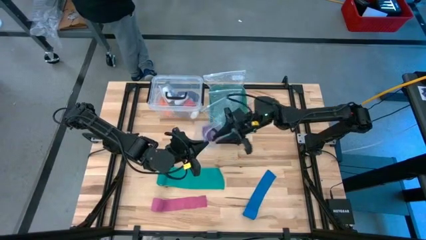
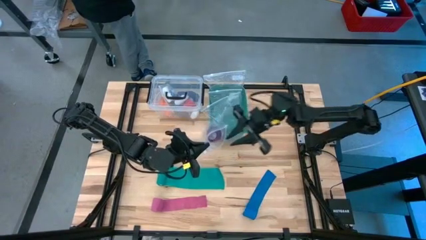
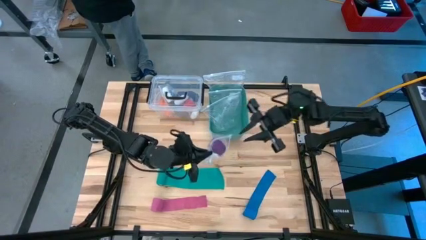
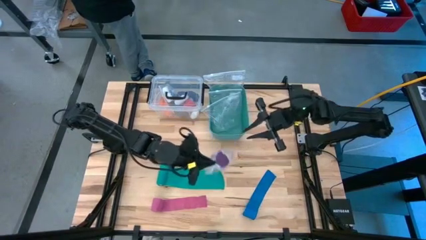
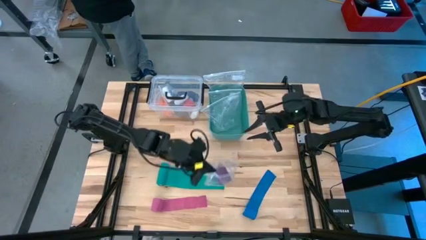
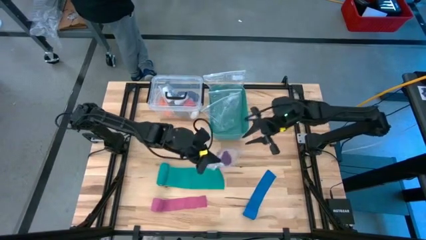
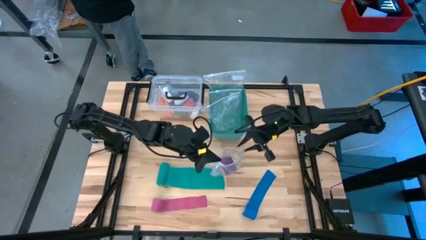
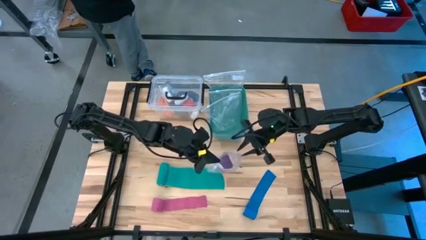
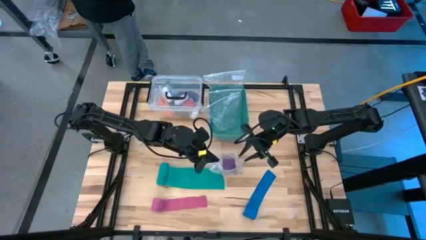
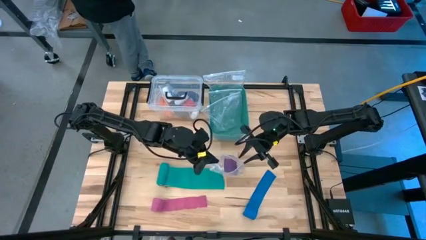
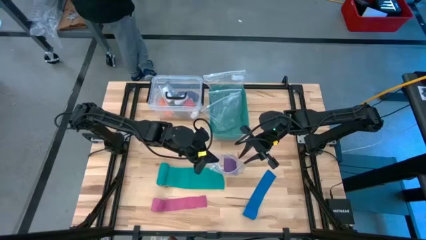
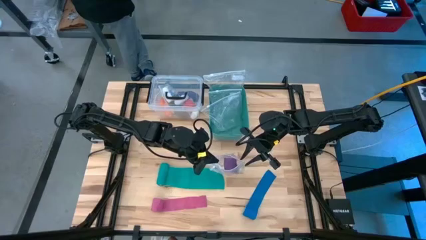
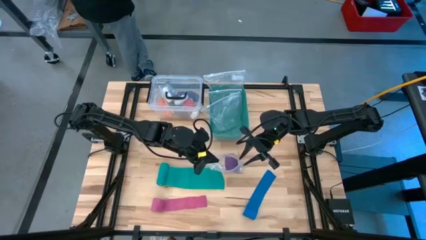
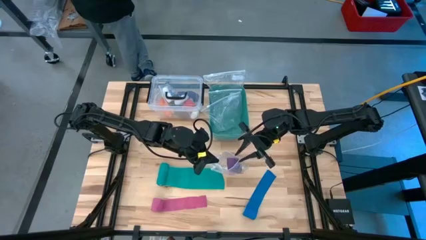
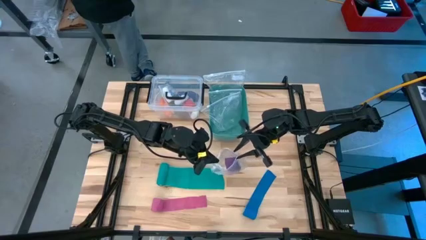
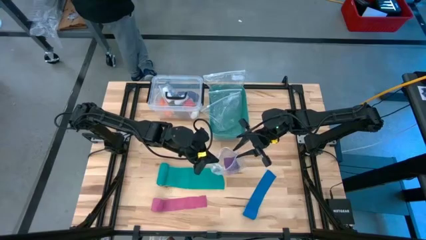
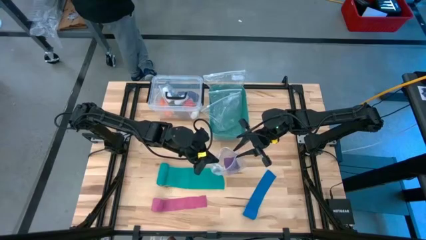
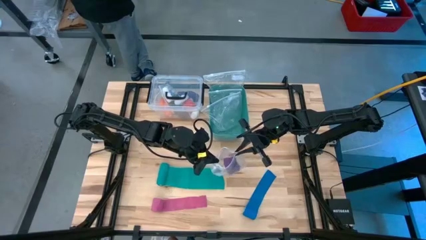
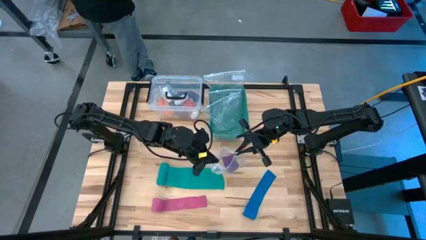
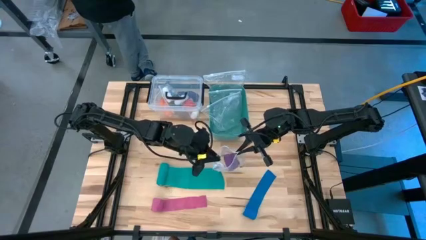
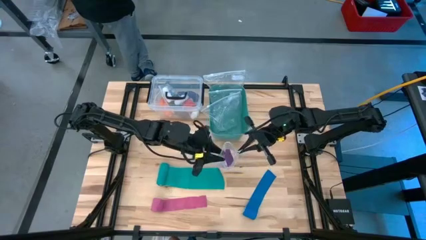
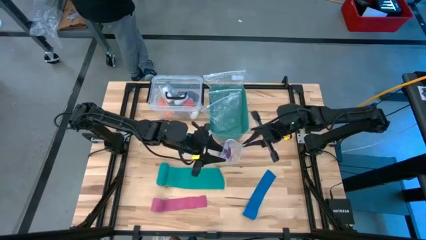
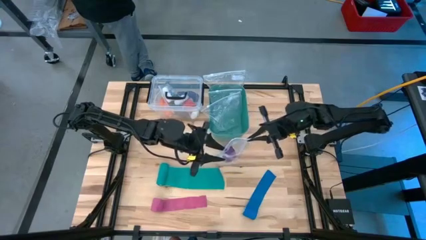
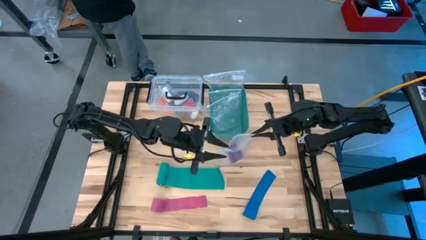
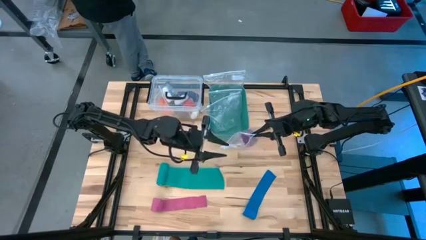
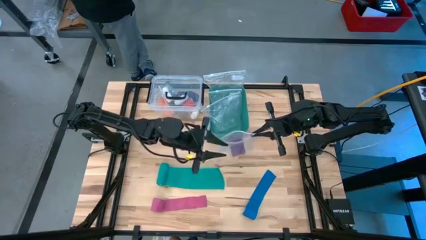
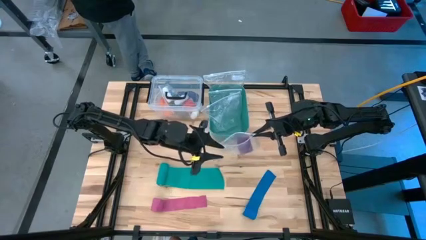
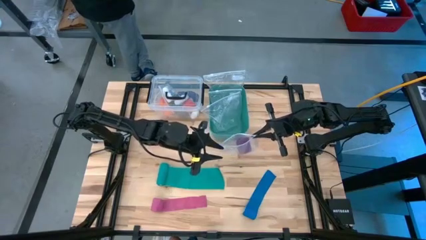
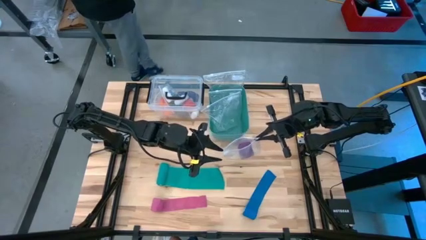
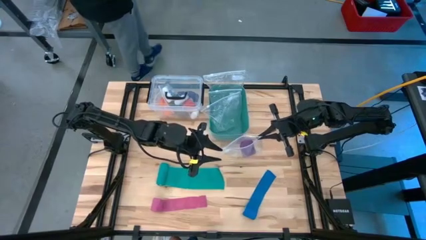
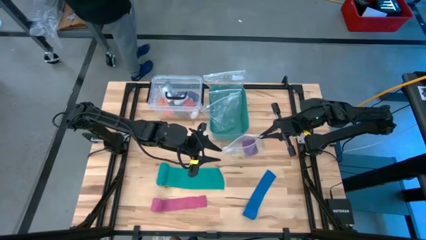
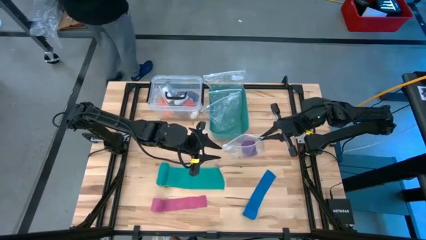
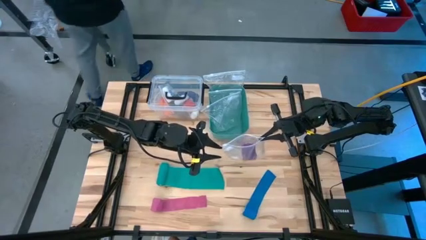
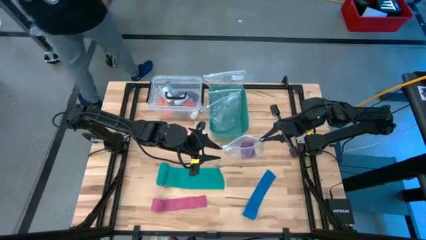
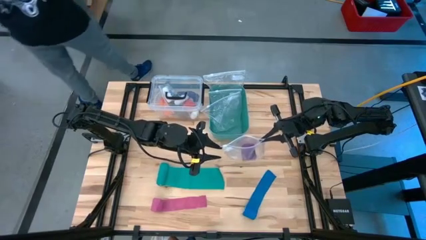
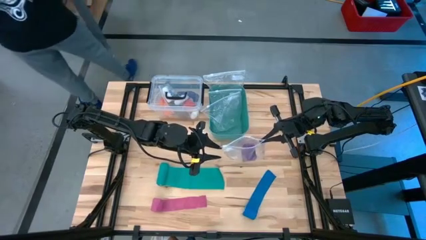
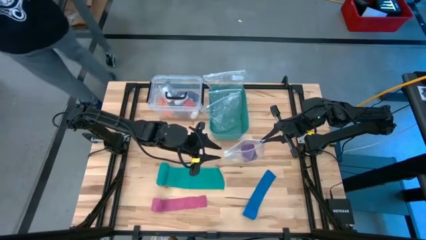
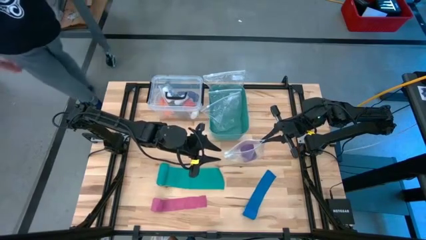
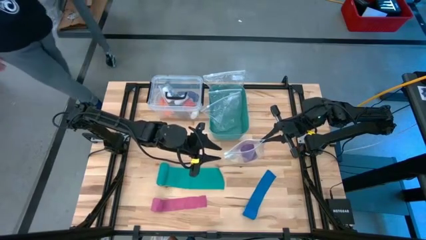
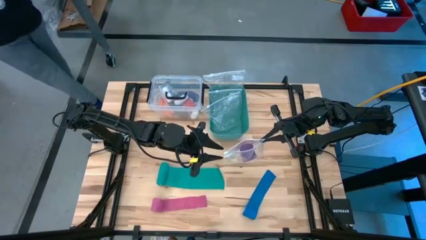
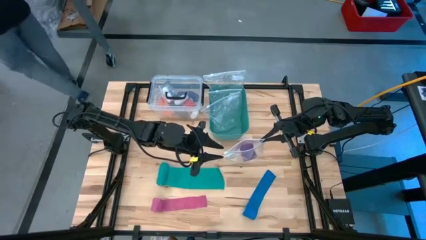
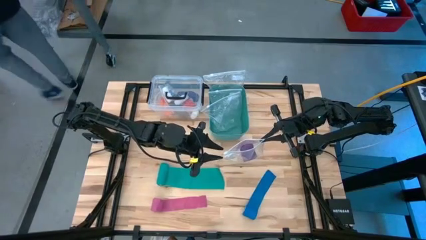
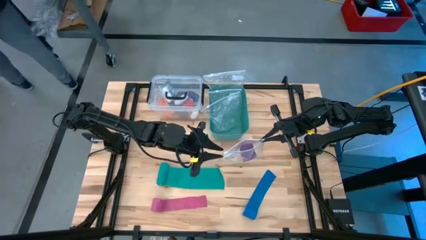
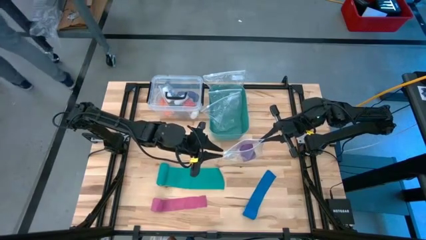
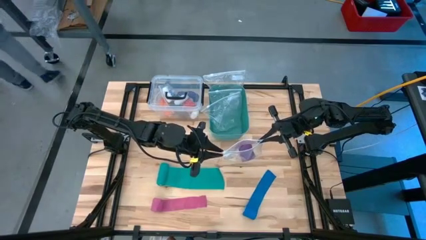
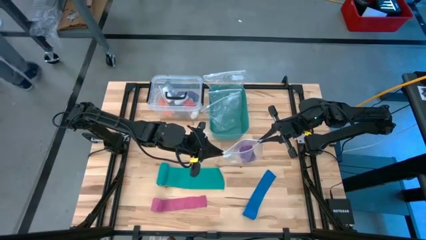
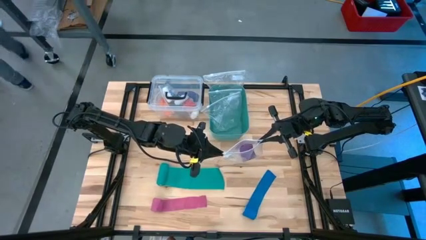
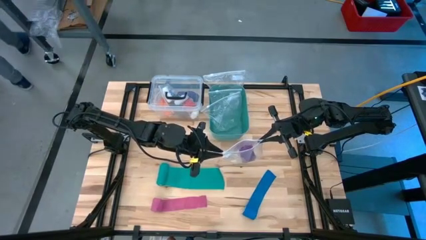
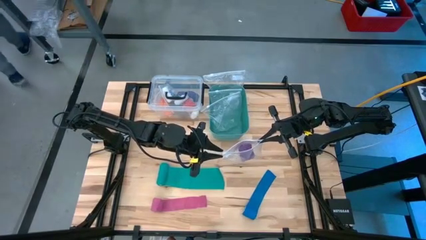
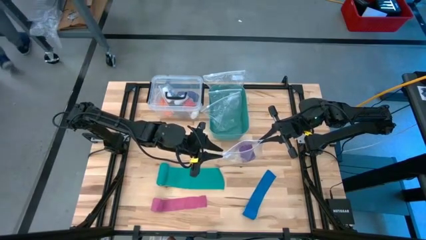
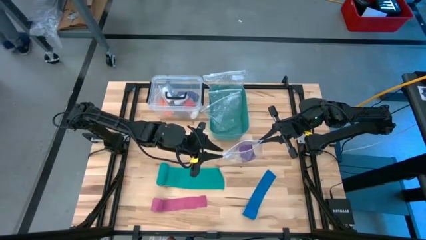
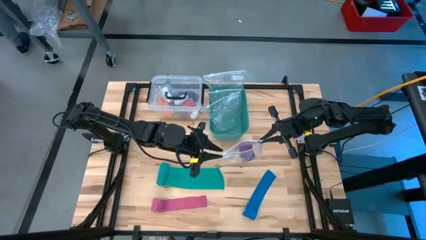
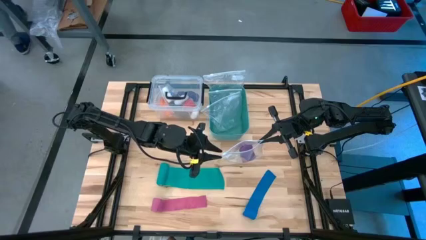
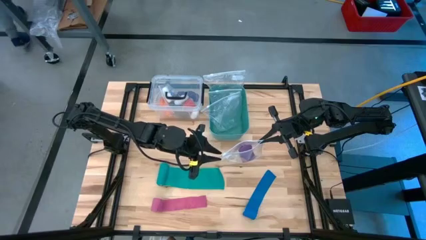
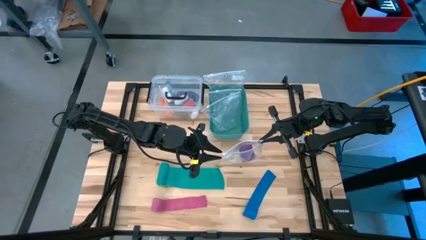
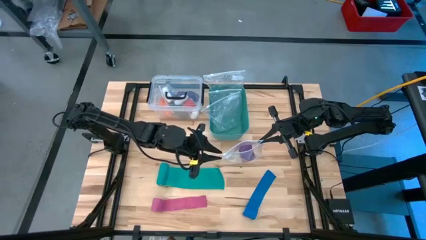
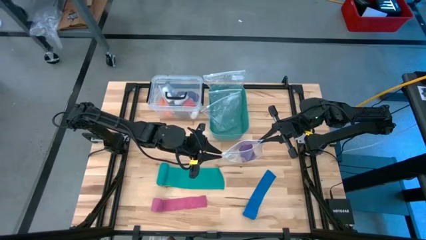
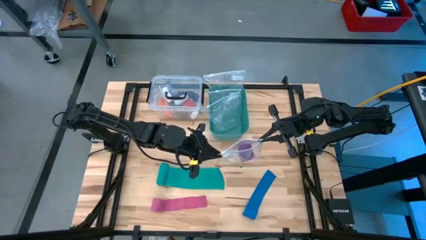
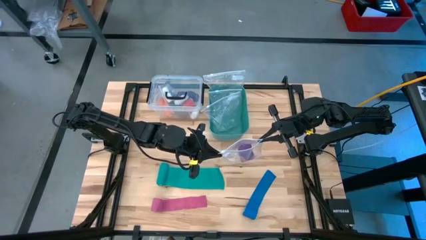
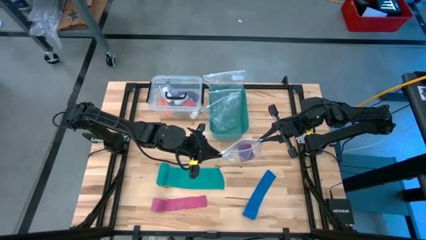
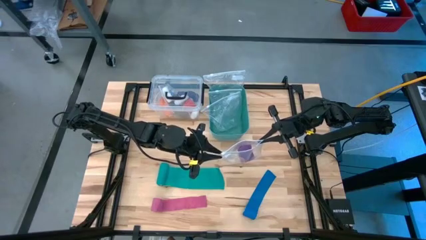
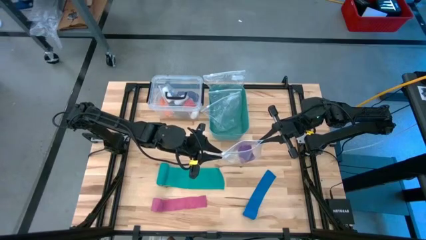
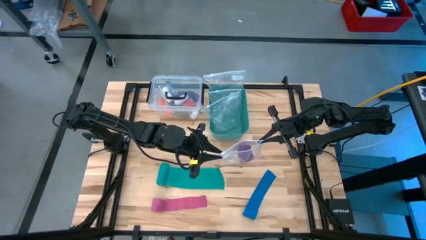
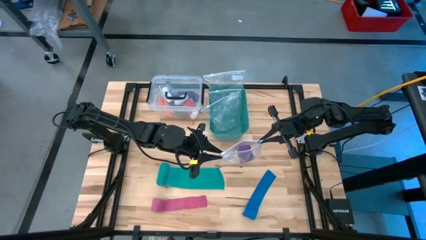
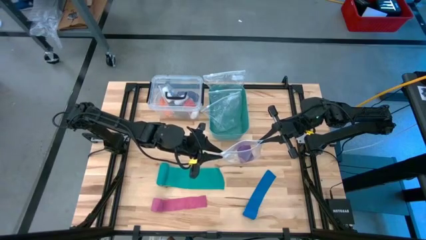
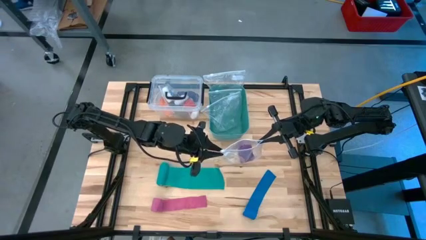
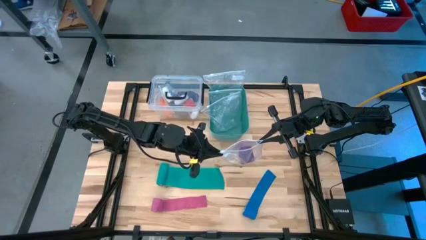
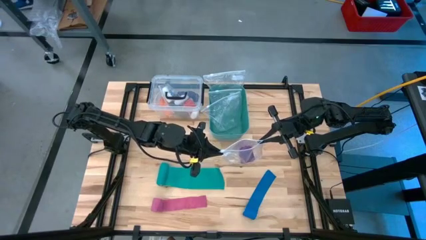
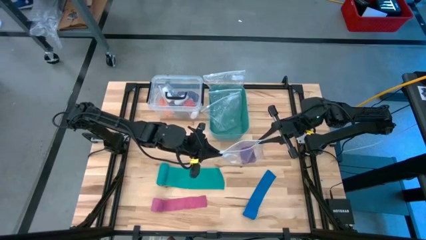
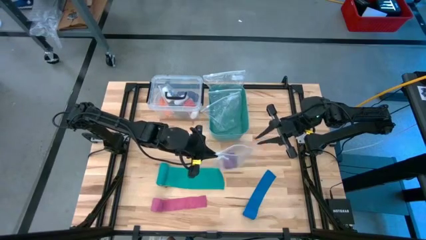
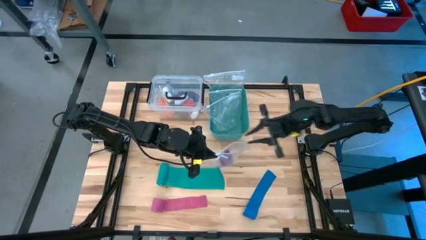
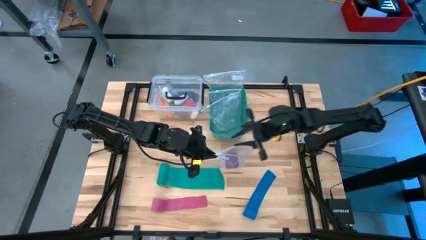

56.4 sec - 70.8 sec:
Task: Roll bandage
Close the transparent zip bag

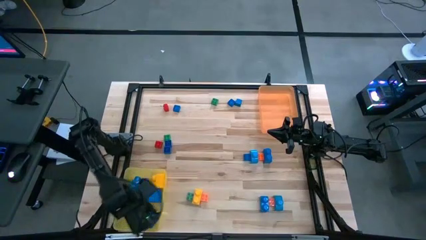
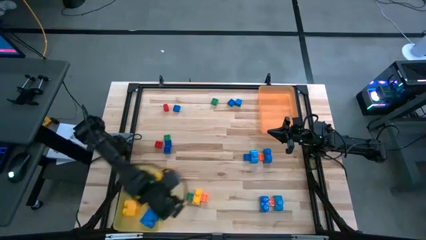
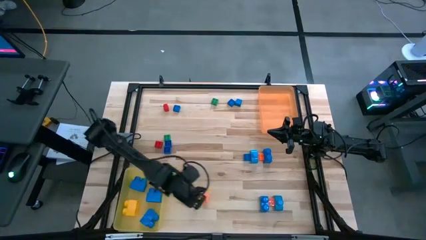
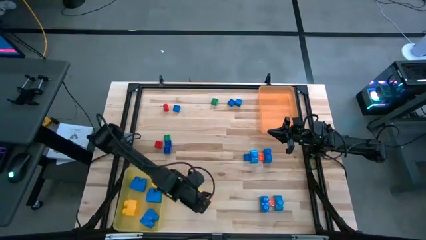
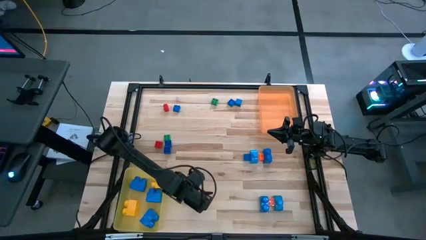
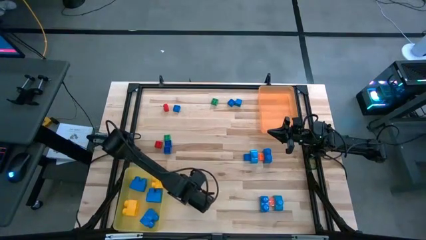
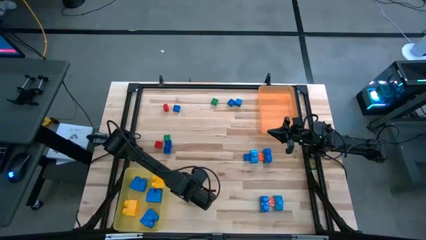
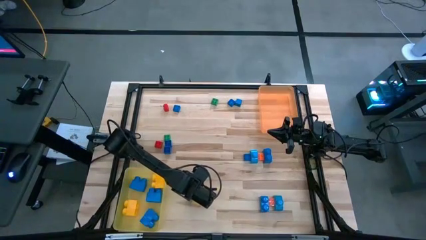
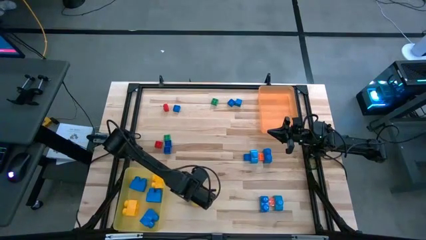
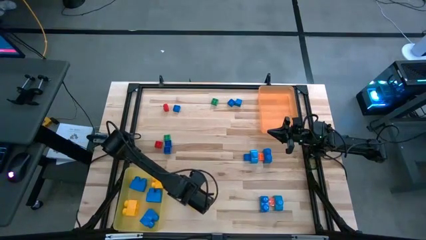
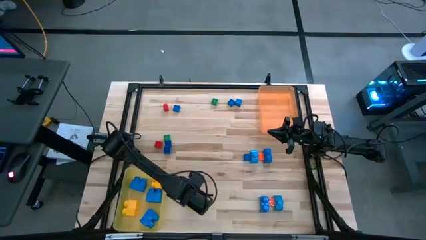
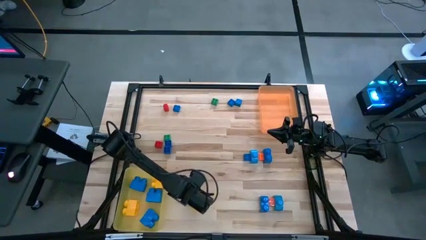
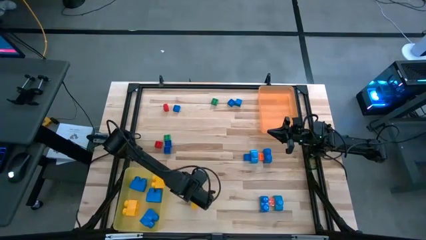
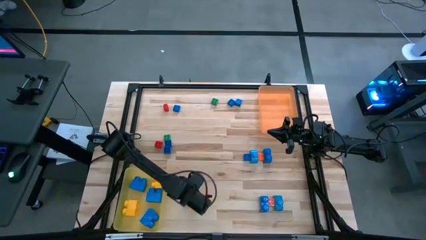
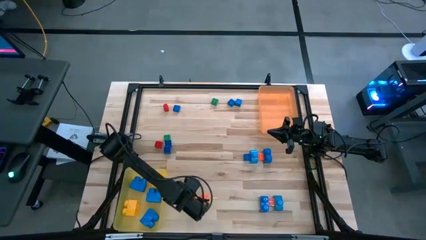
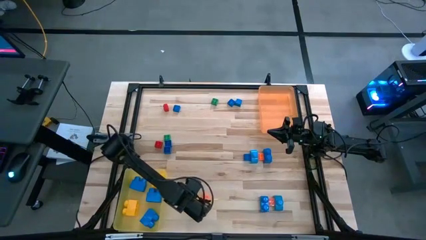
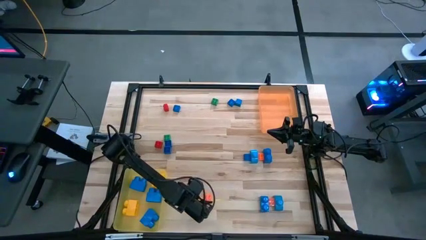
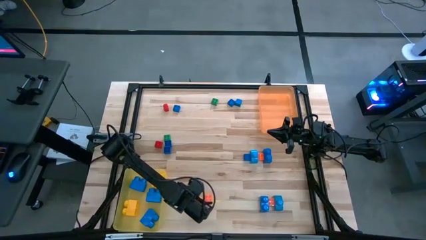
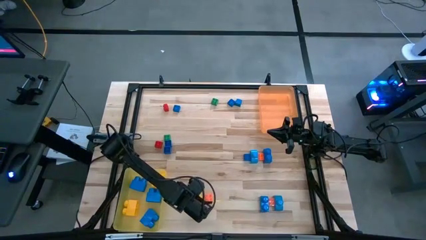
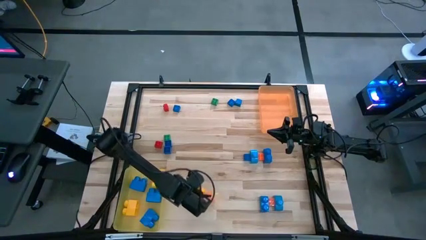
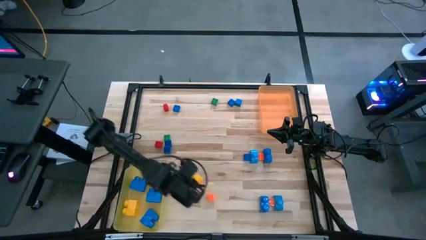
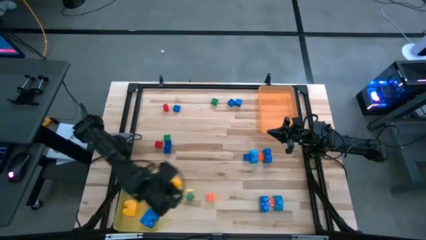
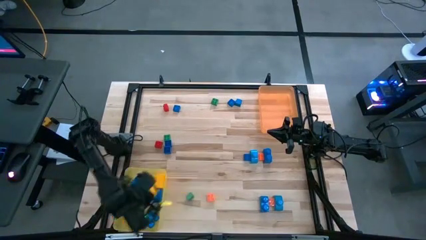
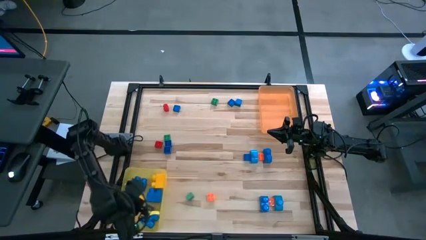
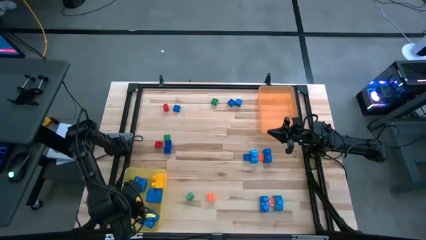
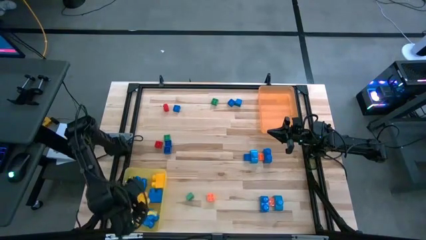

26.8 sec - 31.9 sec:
Task: Sort blocks by size
Put the large yellow game piece into the yellow bin
